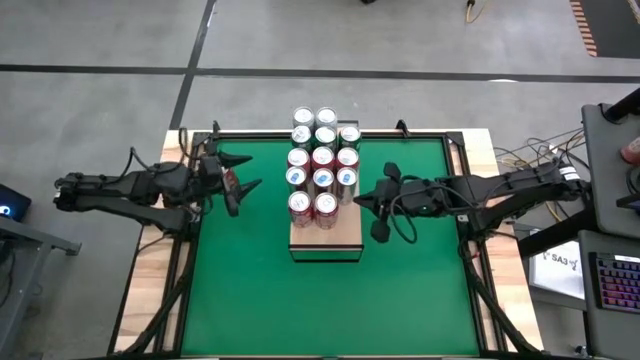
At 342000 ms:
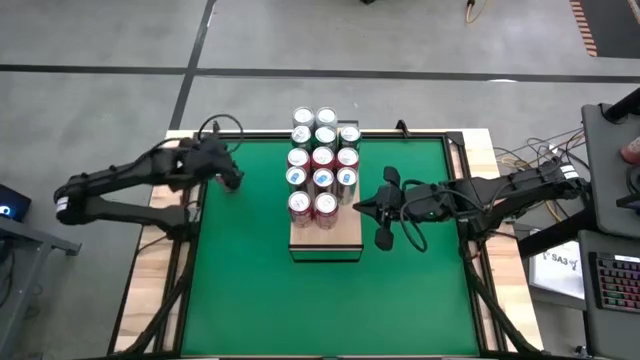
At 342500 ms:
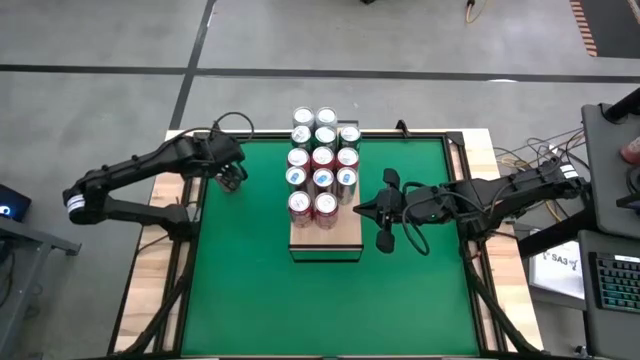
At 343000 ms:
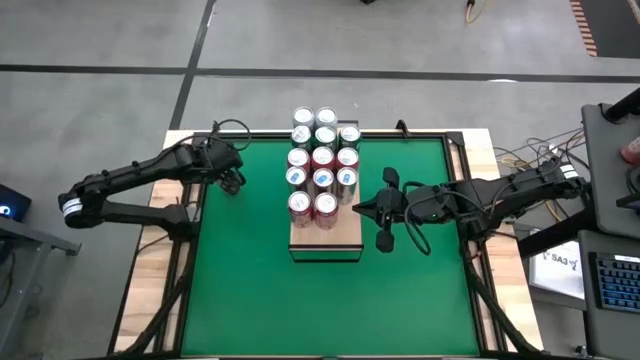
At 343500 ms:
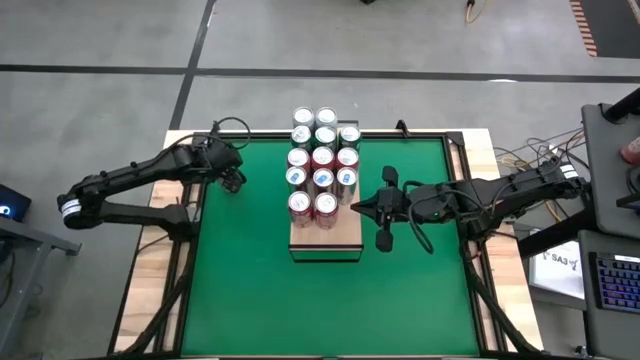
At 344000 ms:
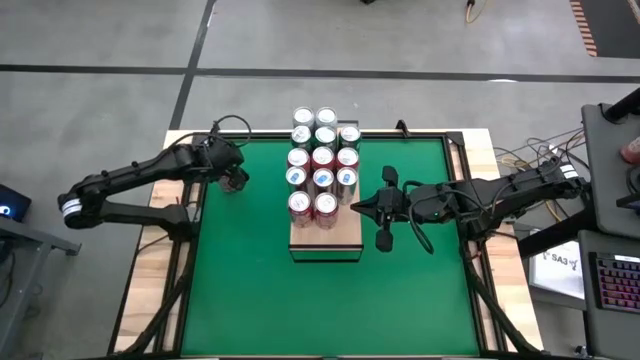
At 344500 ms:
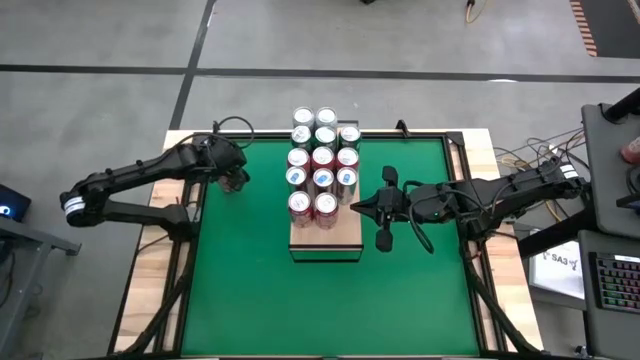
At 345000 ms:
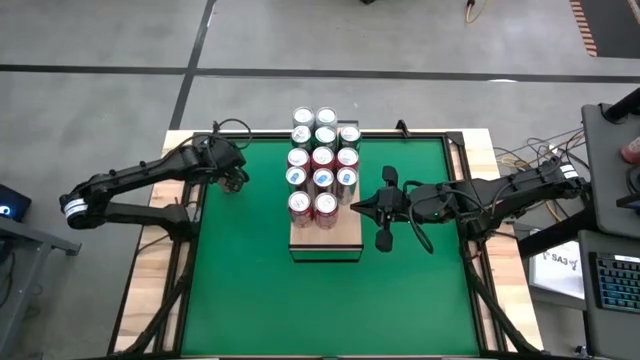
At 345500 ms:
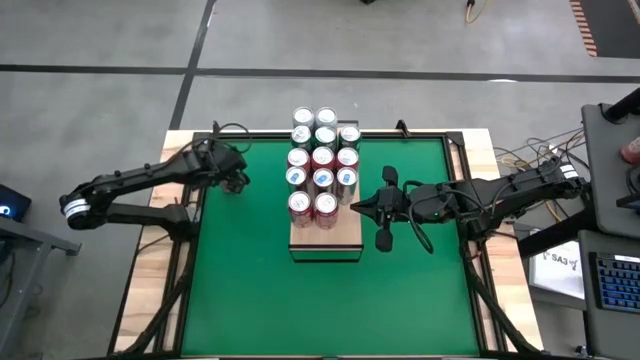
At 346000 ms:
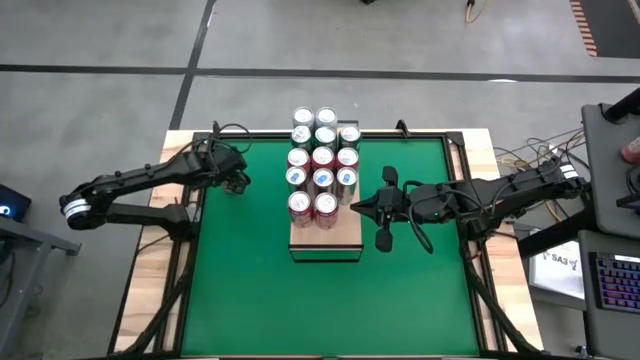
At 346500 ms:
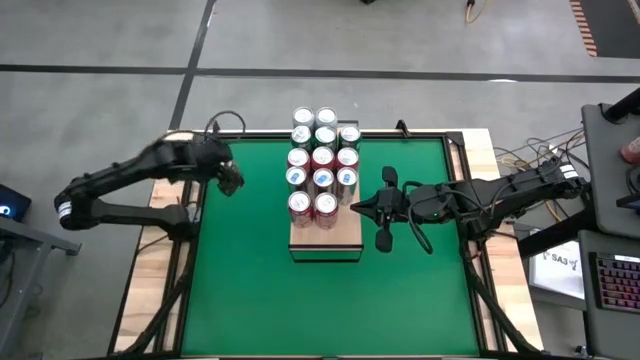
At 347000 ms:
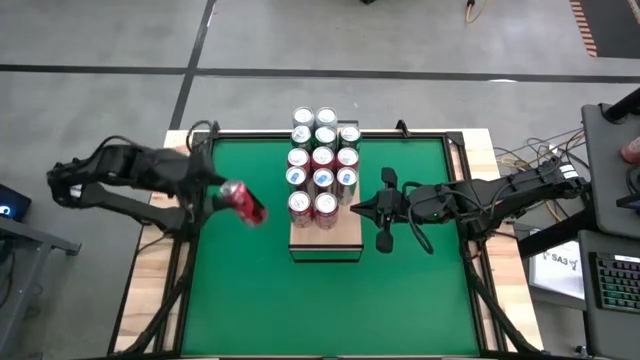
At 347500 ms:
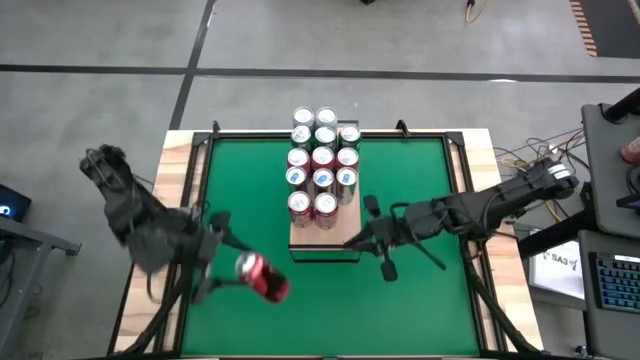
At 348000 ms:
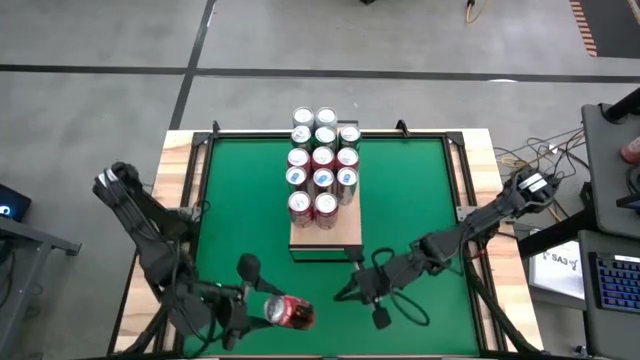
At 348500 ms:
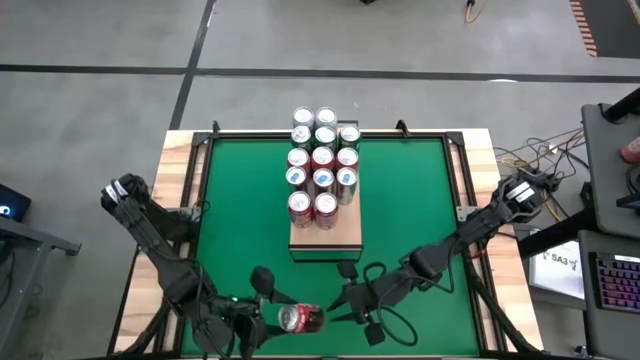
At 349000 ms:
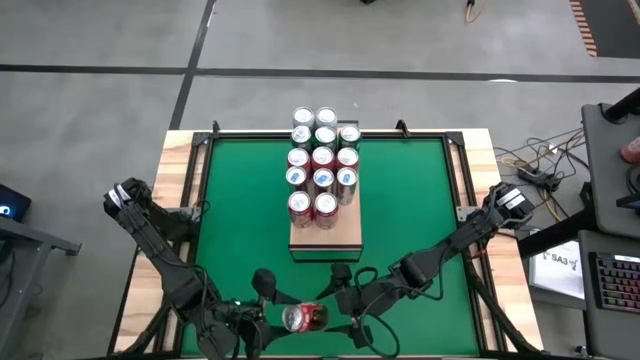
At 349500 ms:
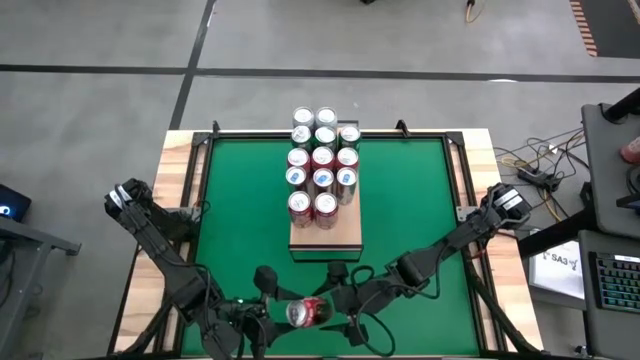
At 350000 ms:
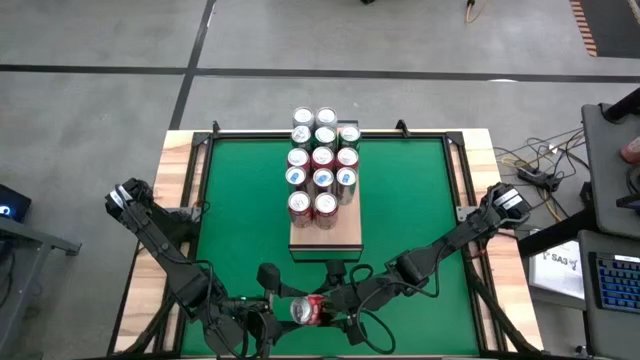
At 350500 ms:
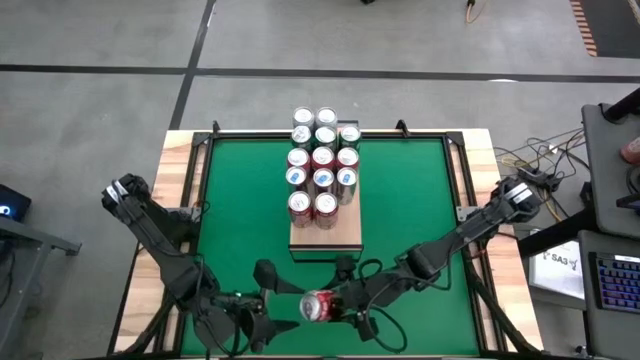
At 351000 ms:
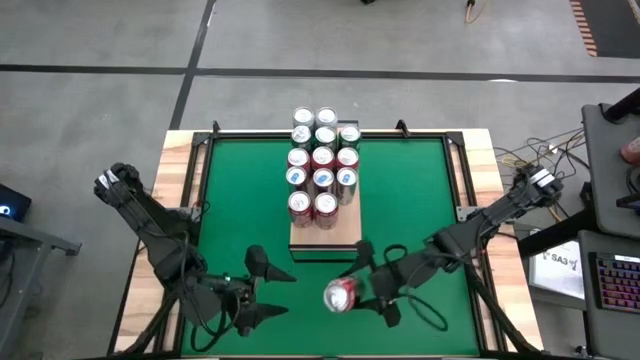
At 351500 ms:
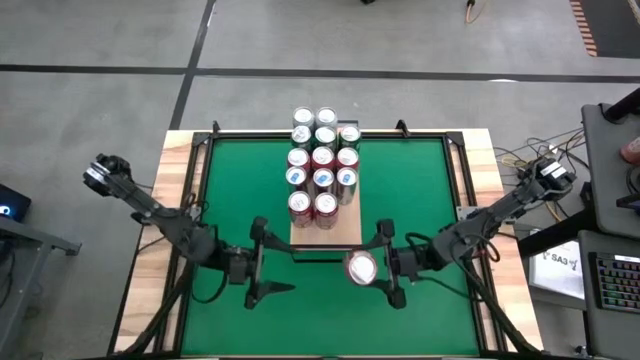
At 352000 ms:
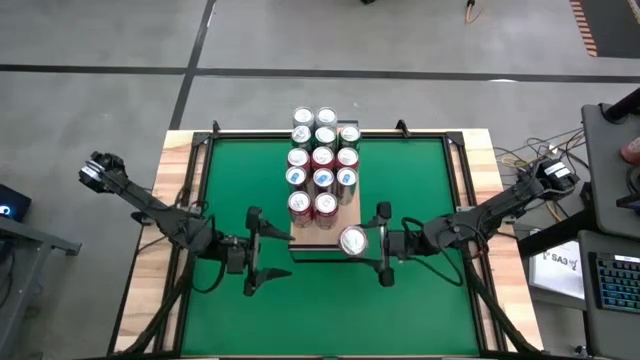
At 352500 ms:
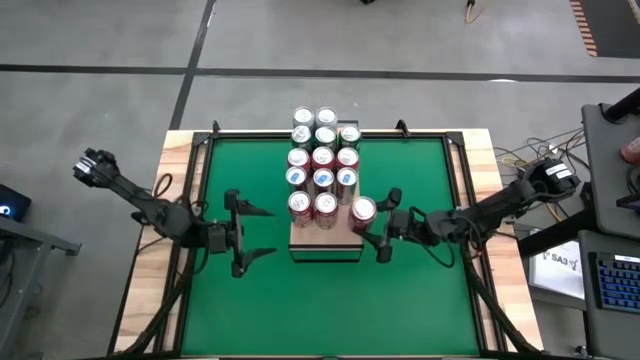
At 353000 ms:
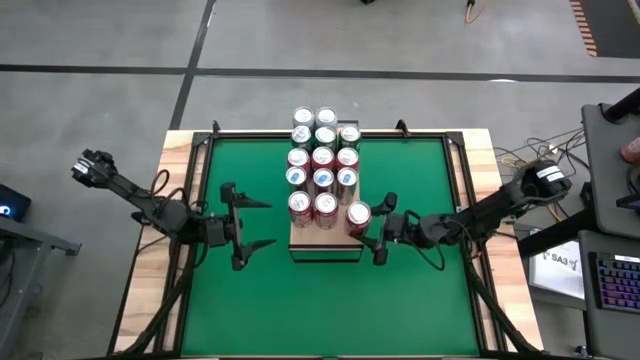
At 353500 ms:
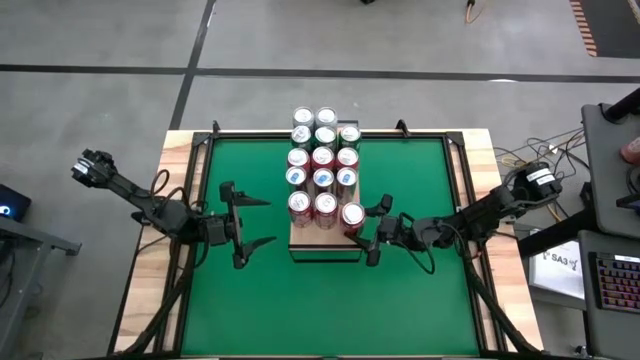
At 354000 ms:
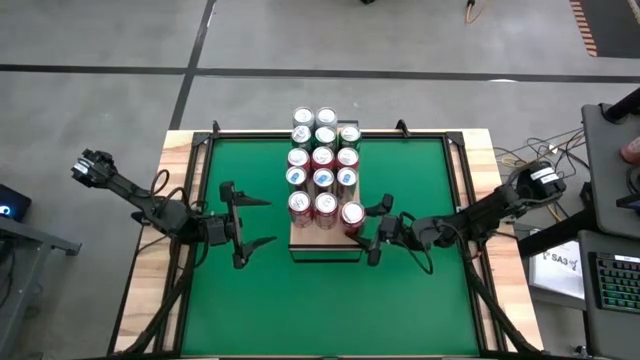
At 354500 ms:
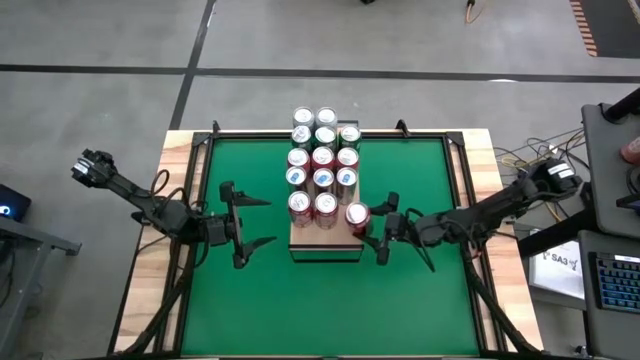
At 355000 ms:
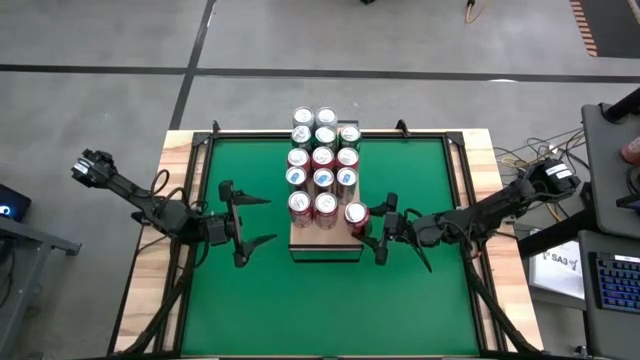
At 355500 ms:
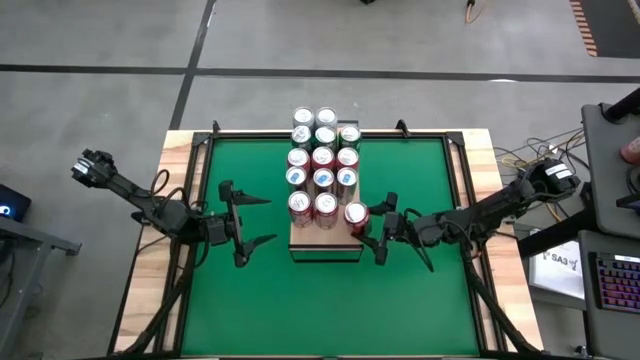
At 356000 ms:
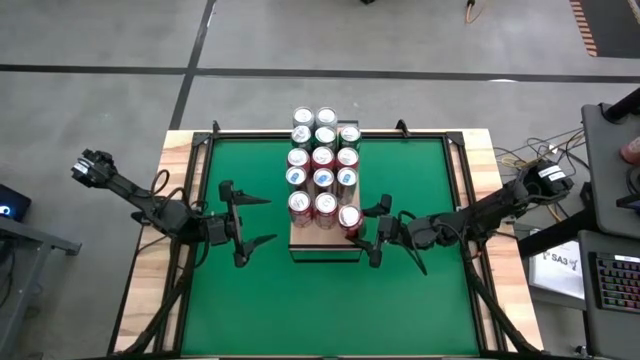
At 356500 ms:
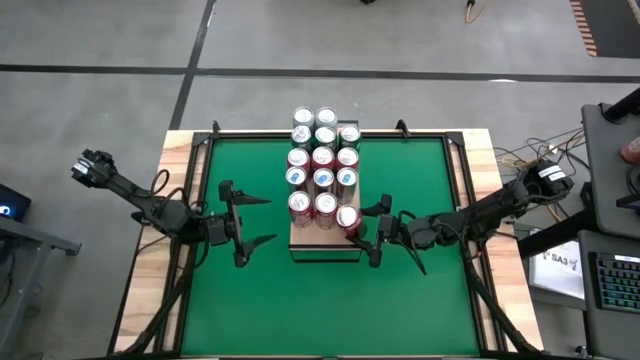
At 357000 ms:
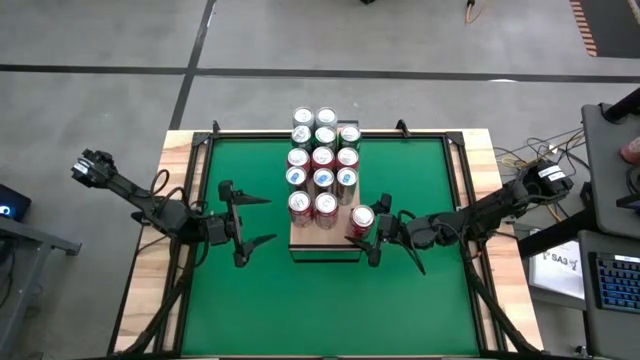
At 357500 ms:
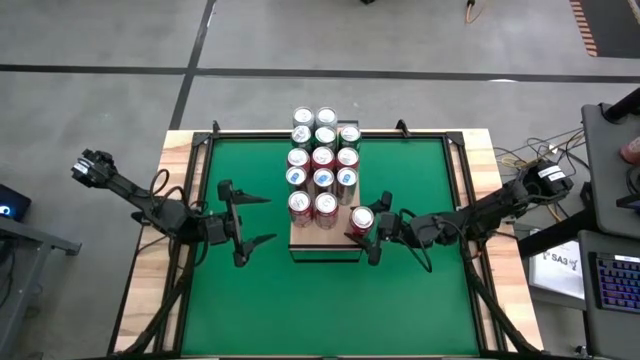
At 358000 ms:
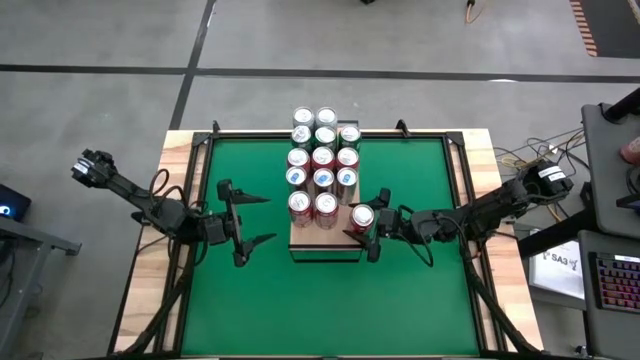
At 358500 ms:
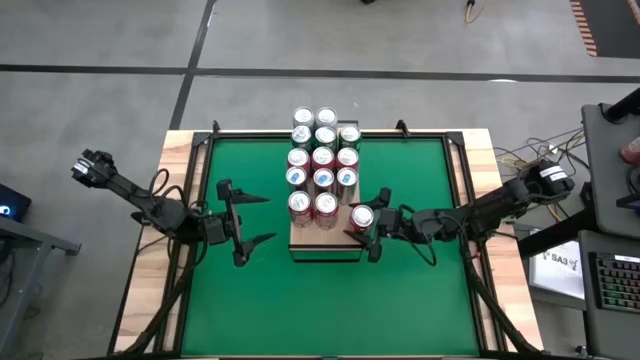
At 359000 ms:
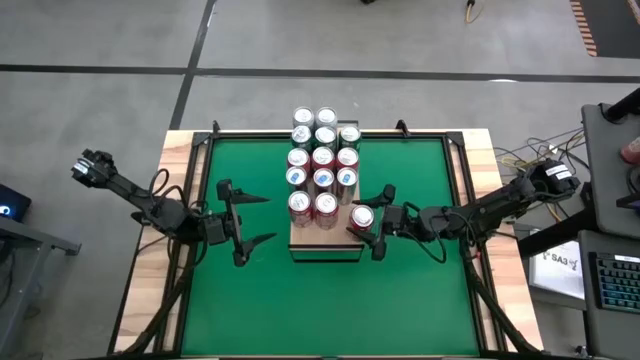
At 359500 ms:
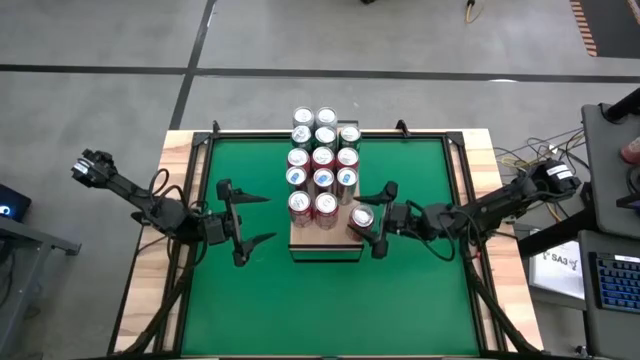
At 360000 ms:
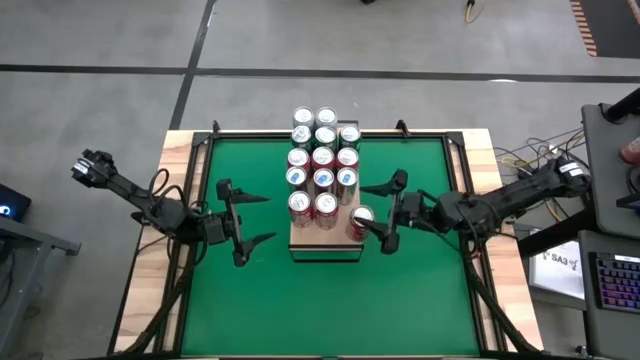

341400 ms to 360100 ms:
Task: Place canned beverage on shelf
Put the red can on the shelf
